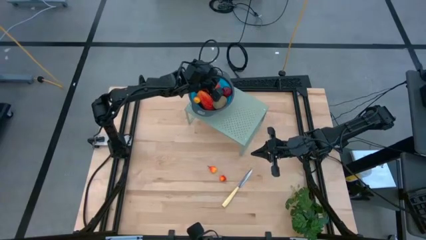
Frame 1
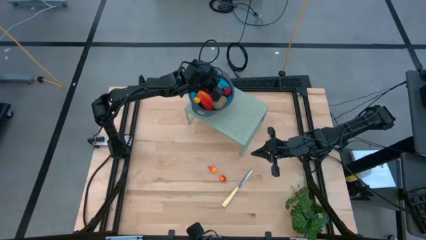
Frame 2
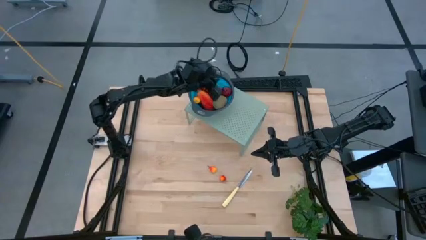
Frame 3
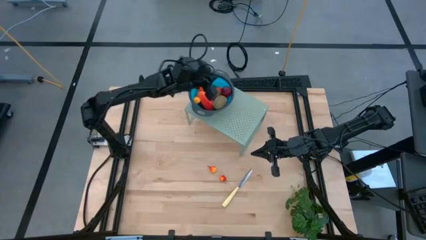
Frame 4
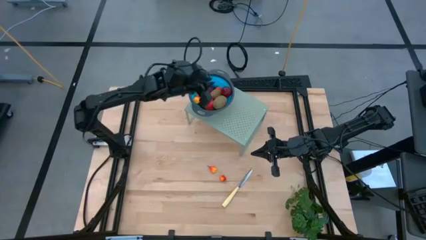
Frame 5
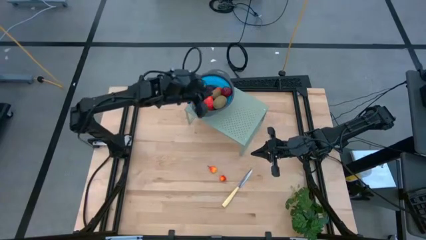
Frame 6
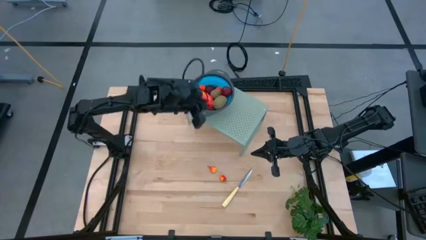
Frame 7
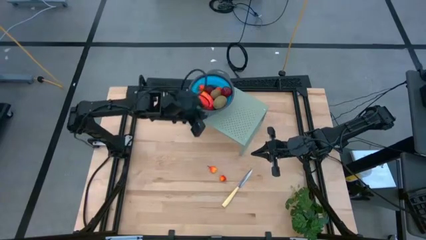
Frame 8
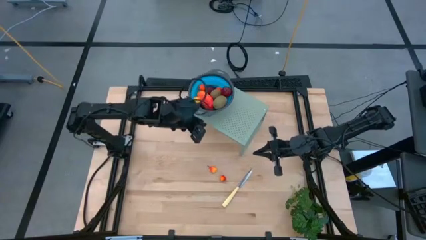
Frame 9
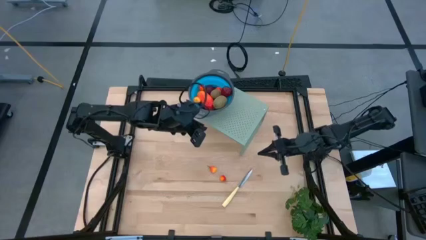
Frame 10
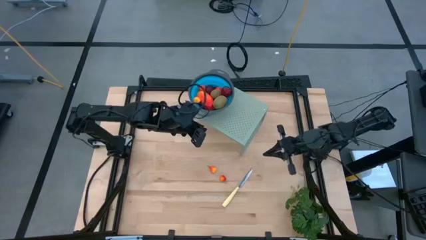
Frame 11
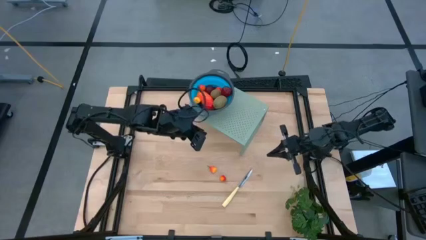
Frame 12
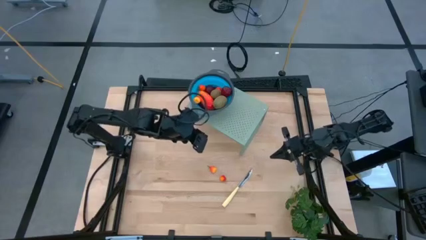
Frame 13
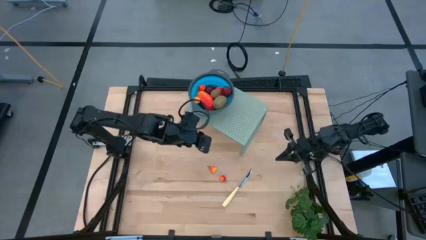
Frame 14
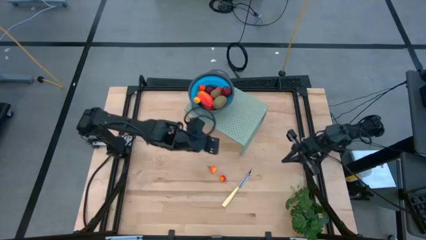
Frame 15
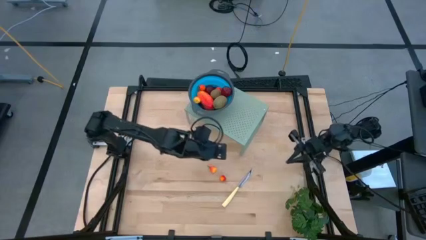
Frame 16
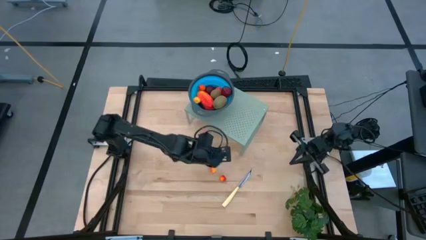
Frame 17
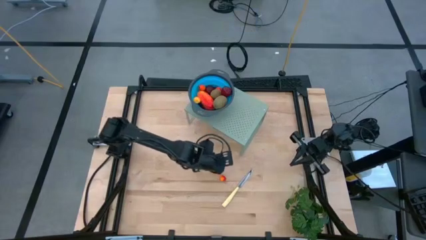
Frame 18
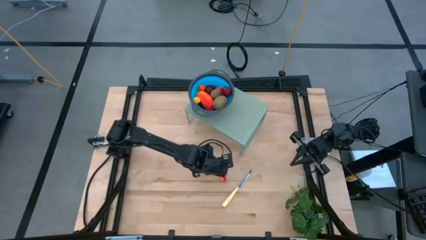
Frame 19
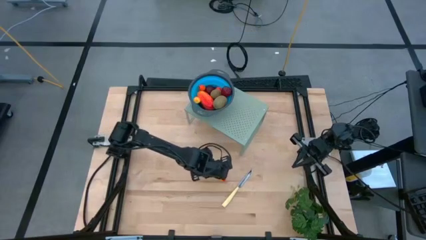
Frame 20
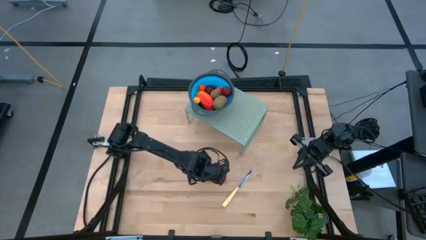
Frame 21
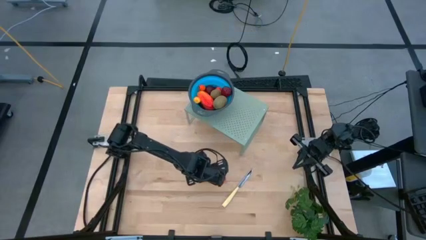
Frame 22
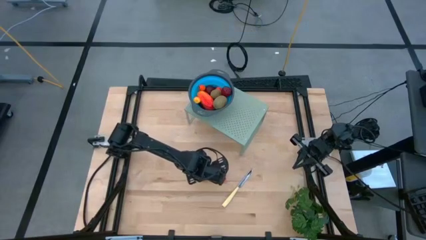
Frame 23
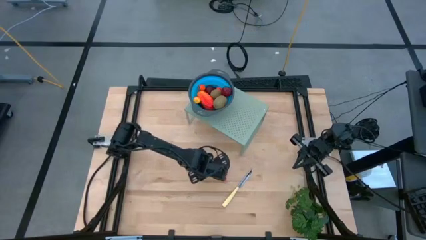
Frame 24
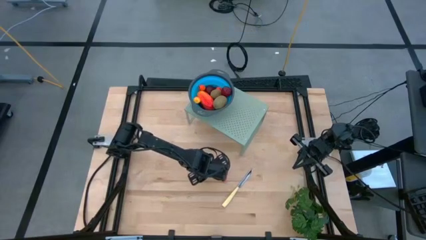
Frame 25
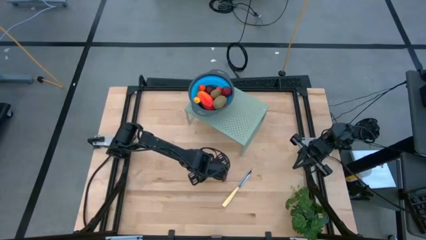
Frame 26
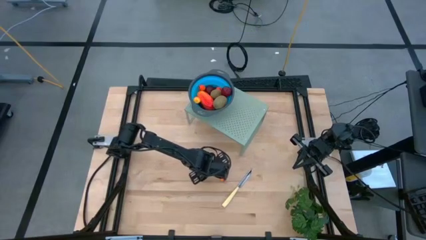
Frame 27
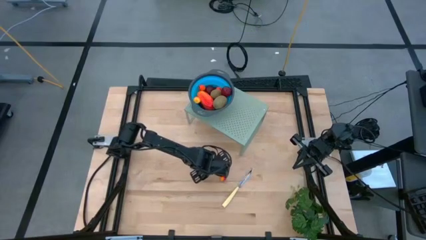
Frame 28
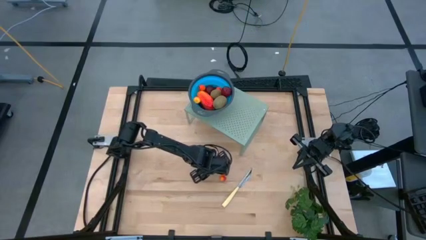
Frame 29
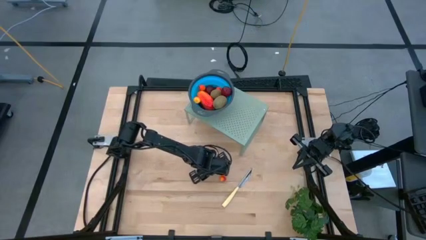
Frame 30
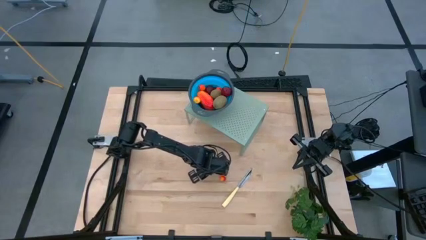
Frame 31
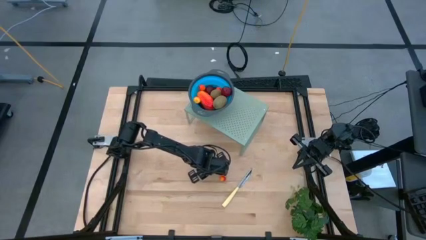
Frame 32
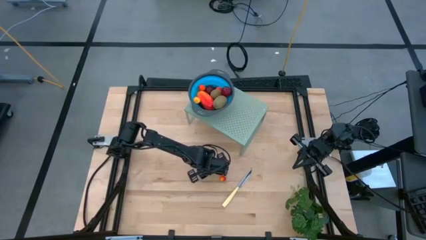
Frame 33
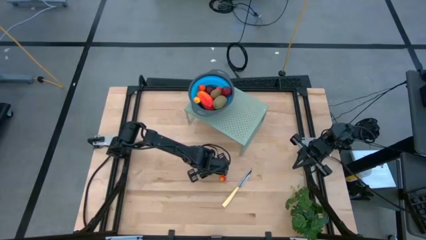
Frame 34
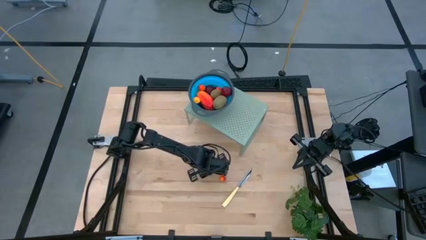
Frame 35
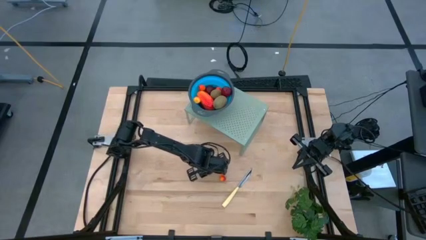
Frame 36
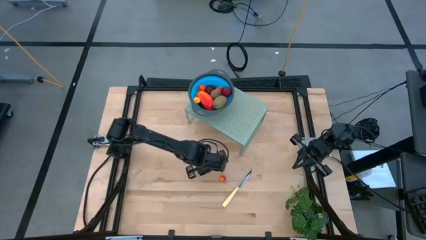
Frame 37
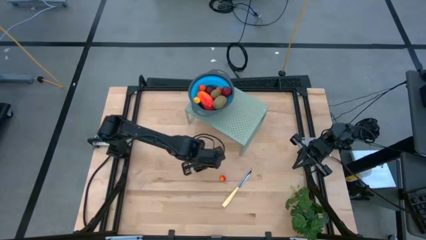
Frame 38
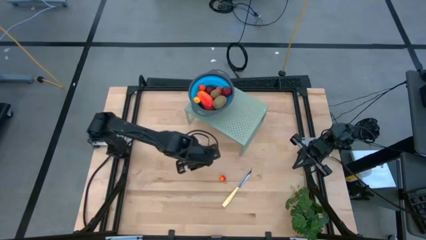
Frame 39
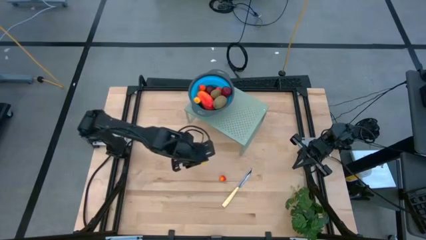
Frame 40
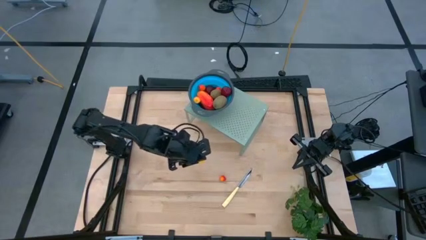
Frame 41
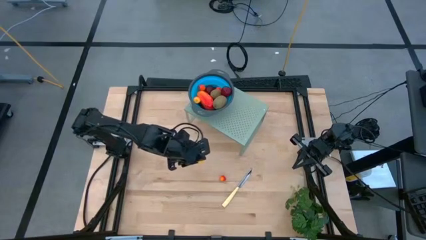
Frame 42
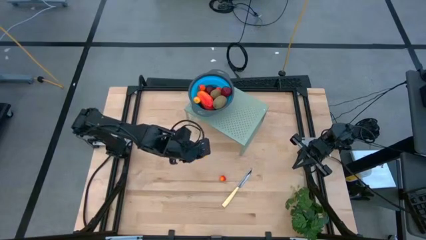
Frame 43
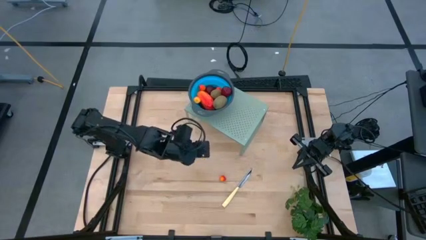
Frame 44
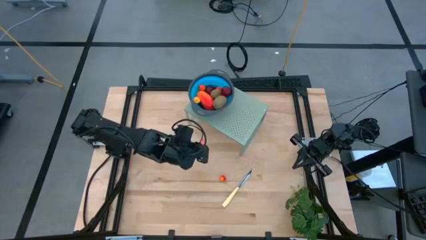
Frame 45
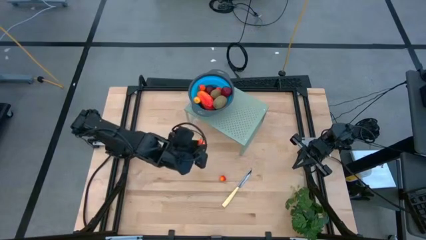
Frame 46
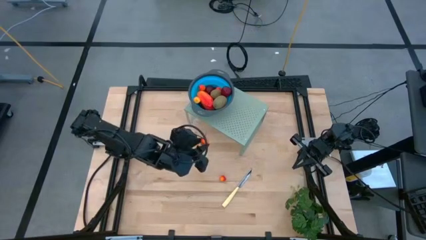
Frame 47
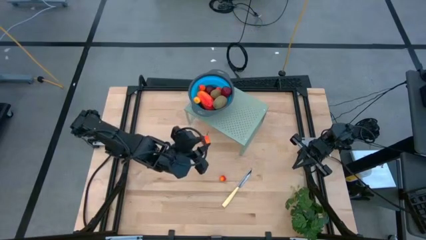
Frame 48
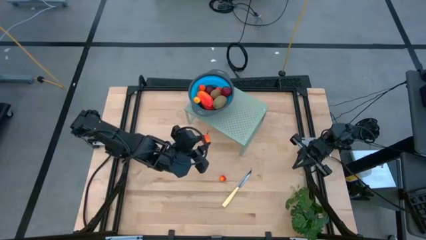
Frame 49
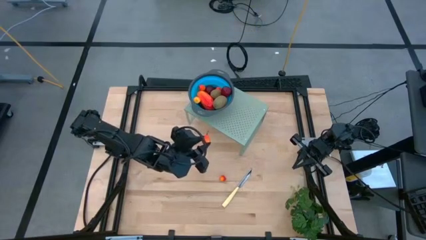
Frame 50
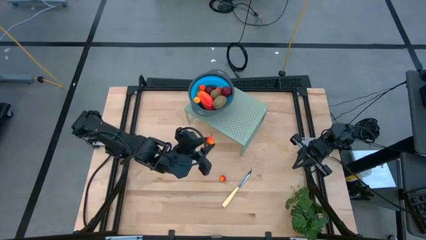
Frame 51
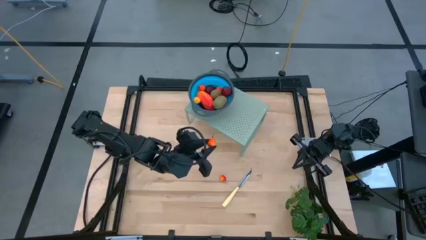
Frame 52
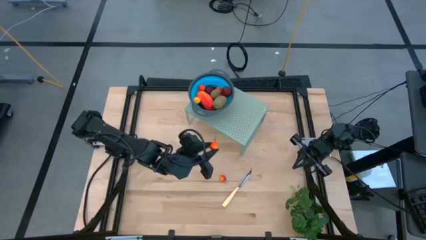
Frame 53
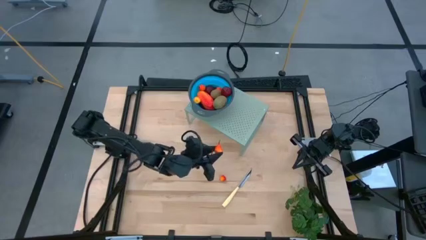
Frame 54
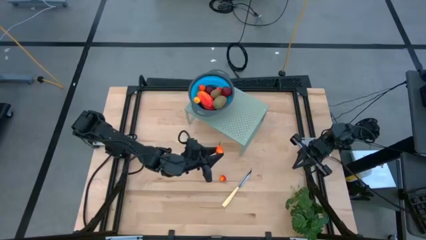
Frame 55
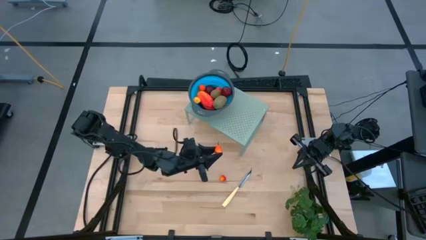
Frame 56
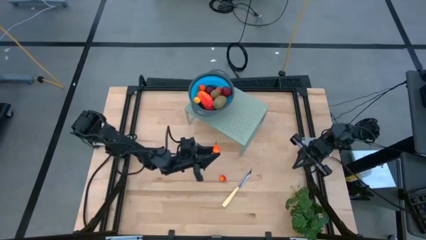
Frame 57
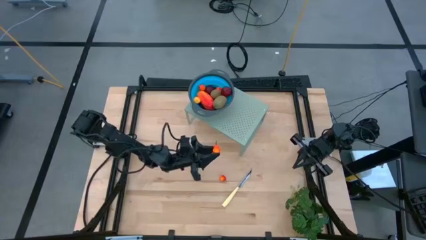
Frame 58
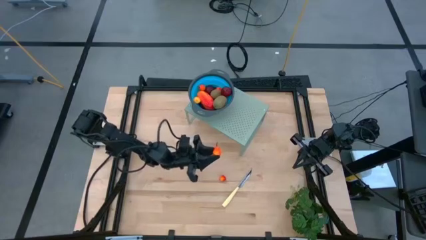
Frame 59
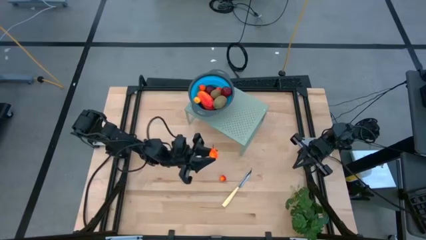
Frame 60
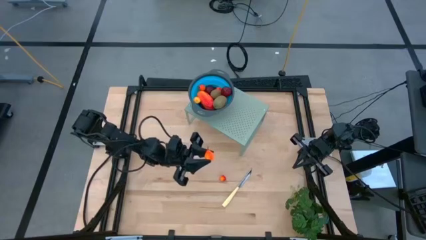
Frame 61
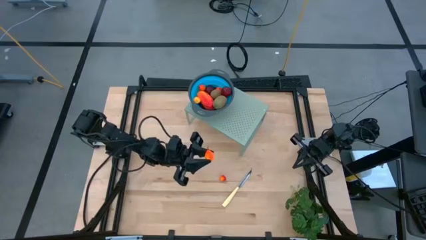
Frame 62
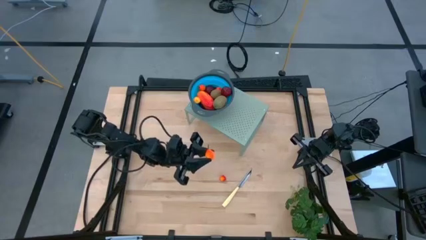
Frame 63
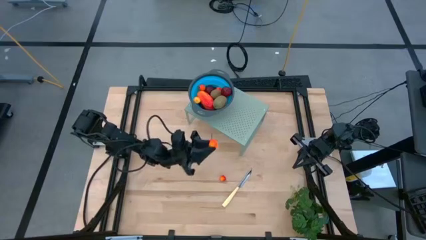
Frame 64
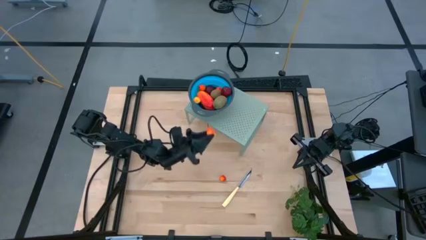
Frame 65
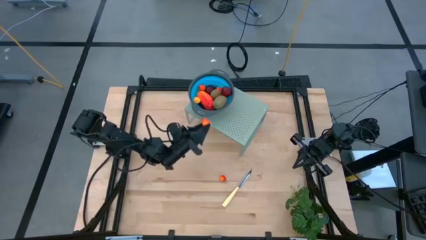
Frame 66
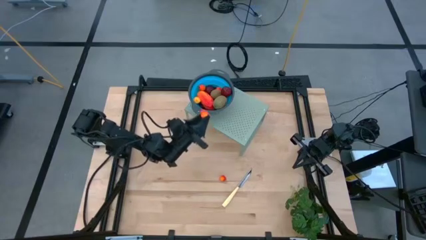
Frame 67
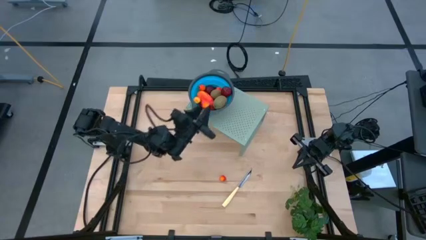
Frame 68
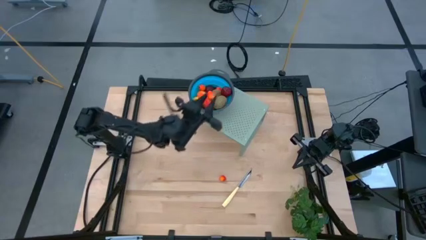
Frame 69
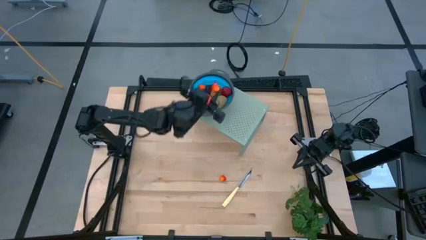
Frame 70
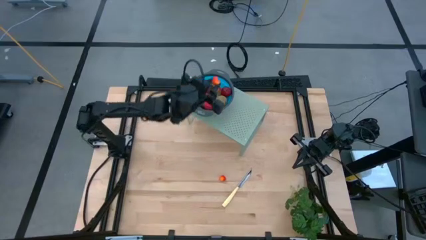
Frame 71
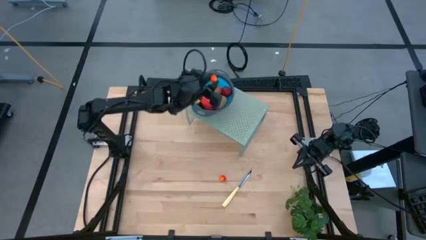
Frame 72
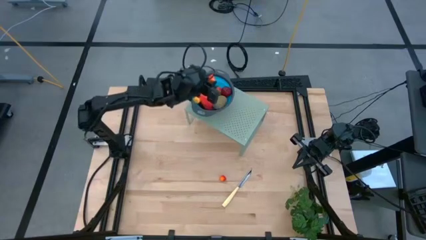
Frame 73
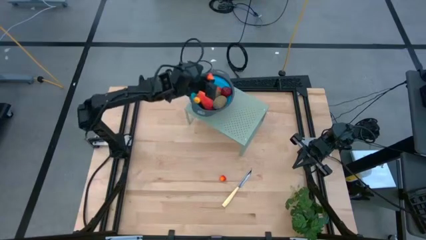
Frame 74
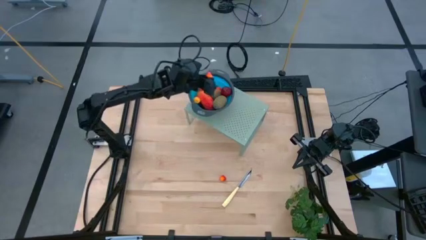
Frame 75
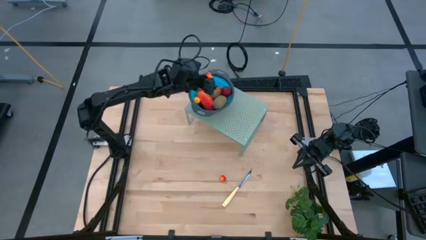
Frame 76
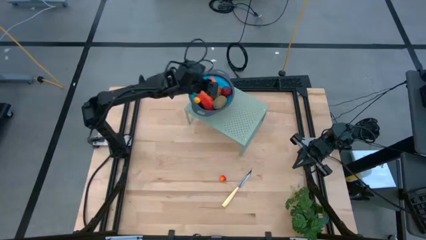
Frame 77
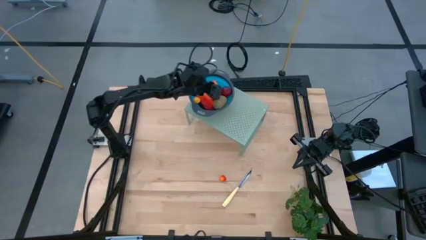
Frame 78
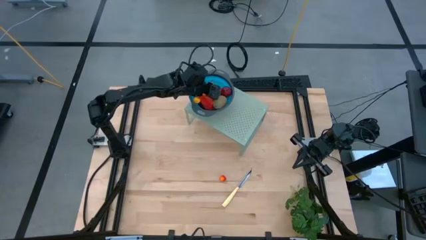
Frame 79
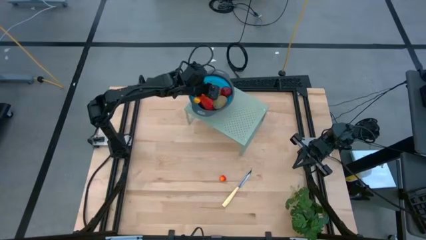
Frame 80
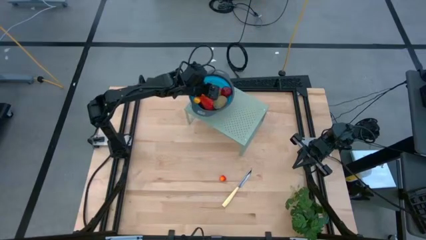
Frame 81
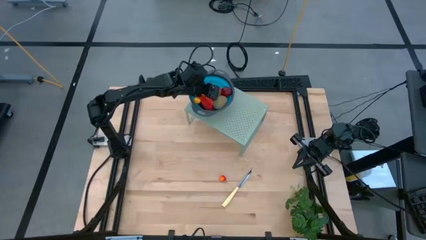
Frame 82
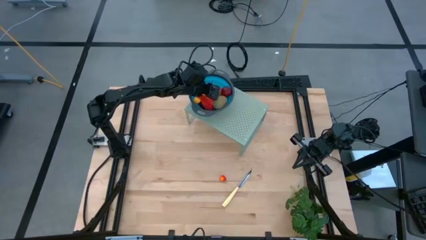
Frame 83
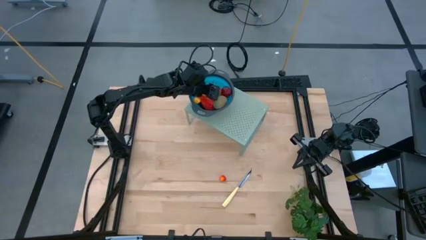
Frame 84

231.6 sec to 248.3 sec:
Task: Pick & Place Fruit
Put the peach into the blue strainer bowl on the shelf
